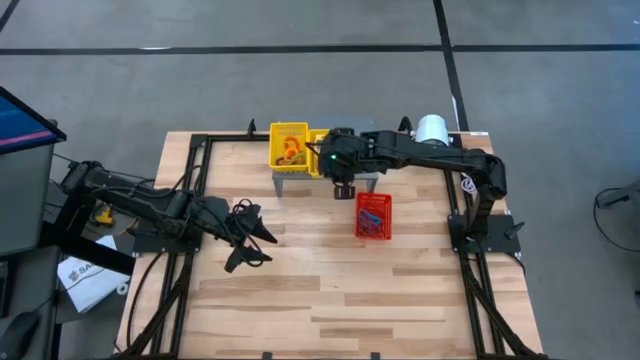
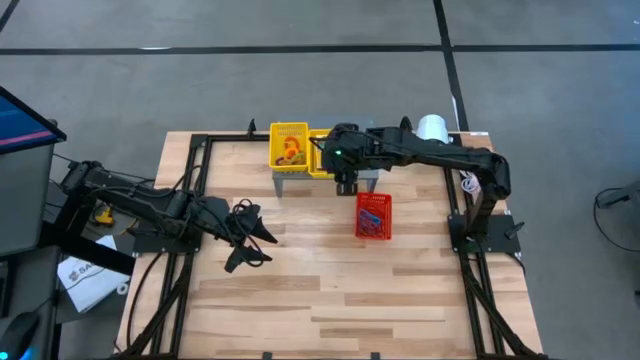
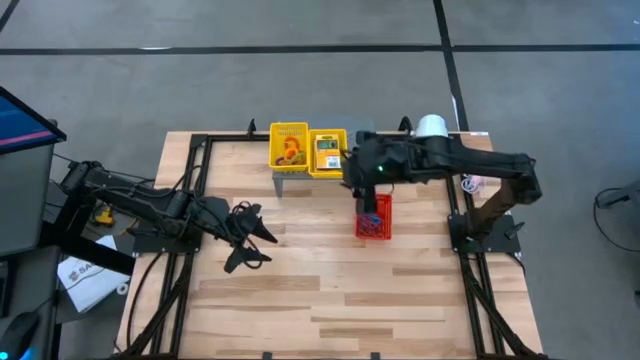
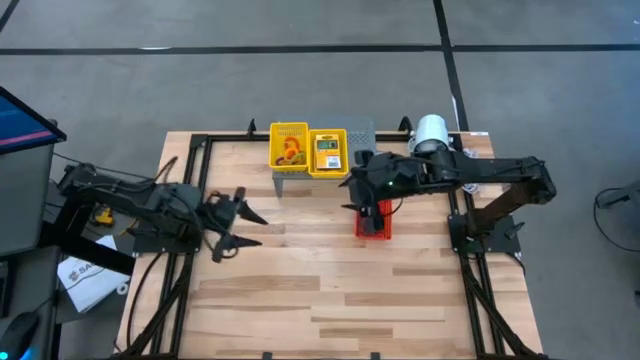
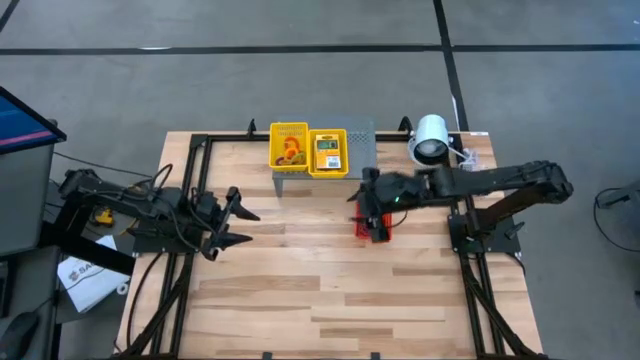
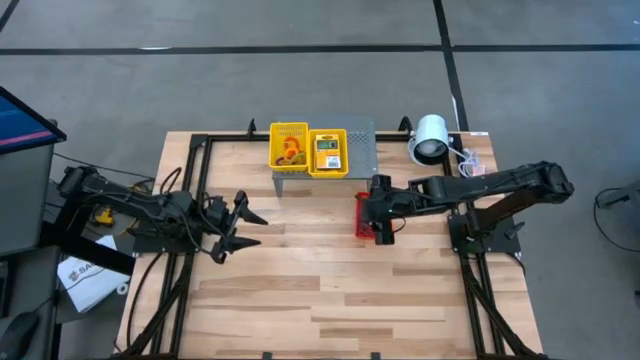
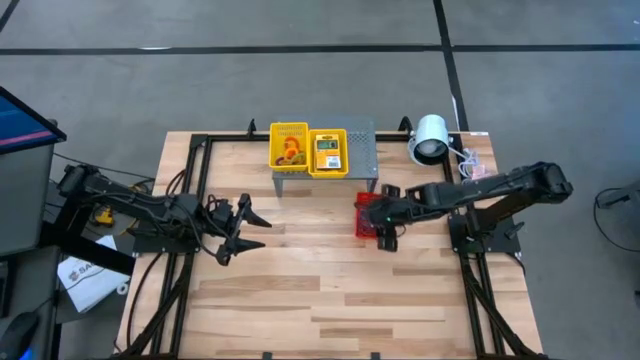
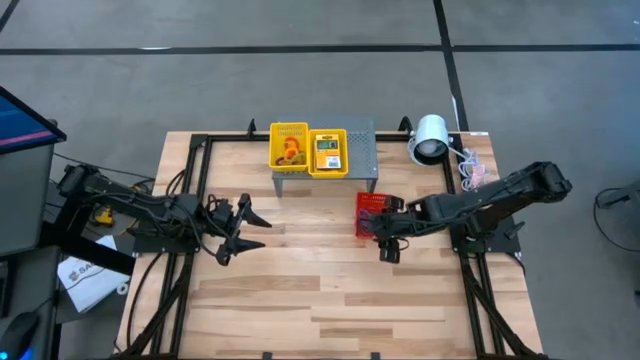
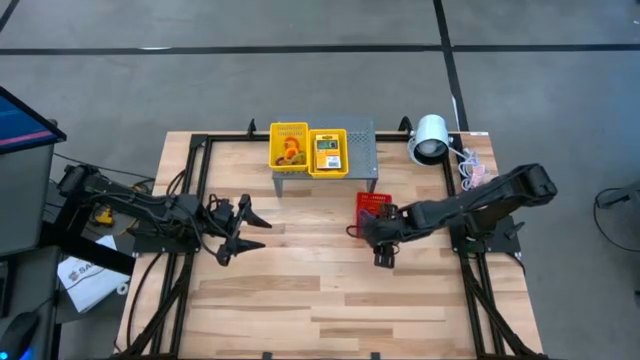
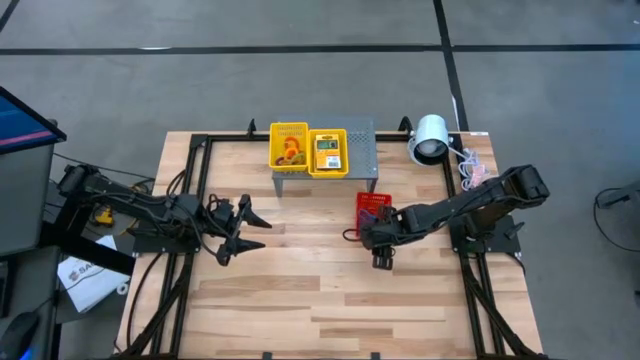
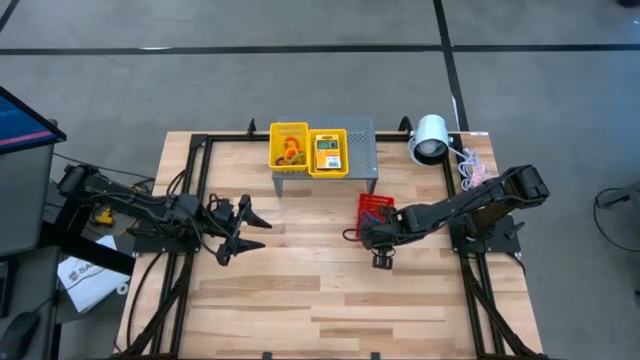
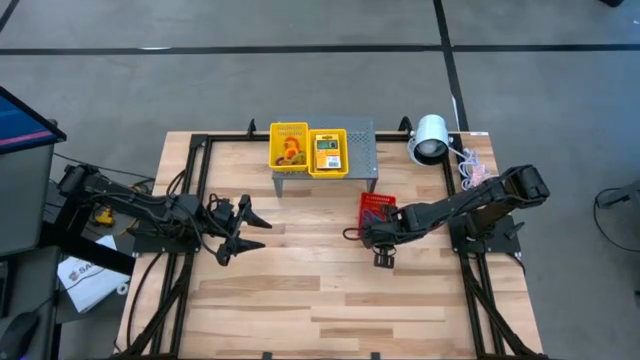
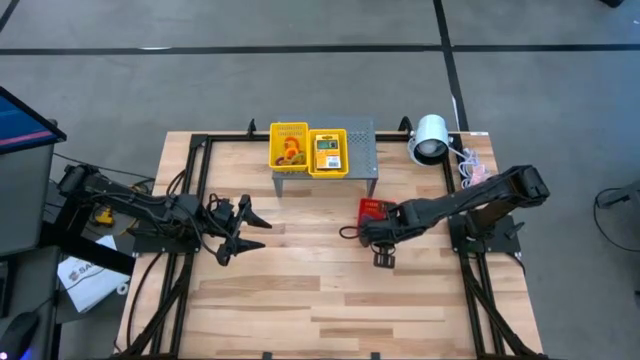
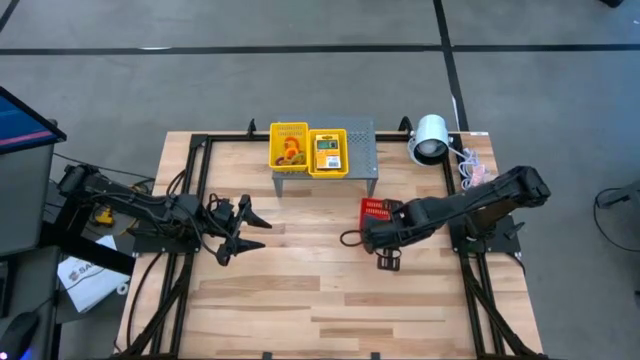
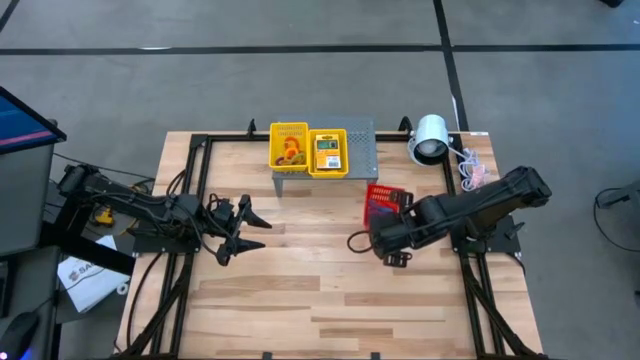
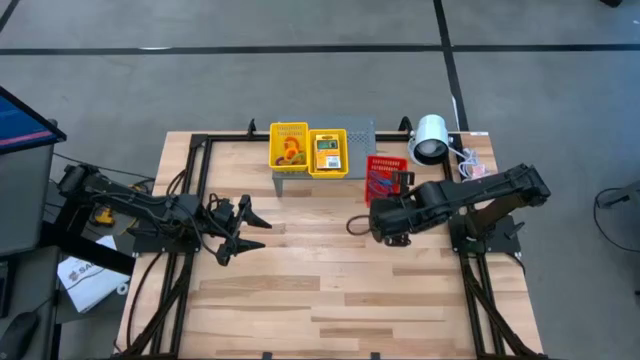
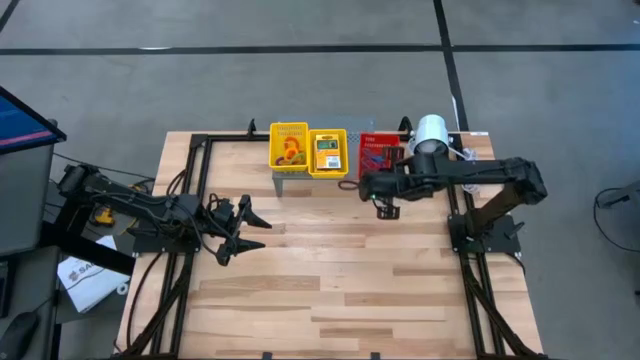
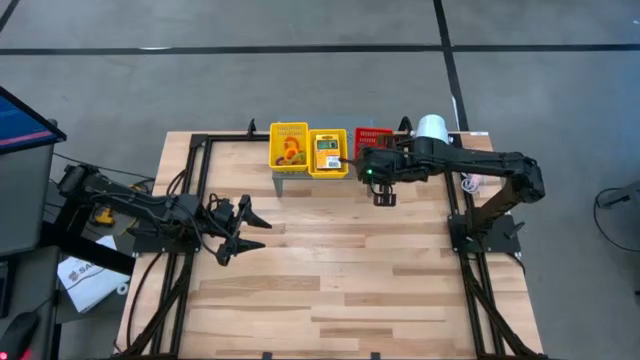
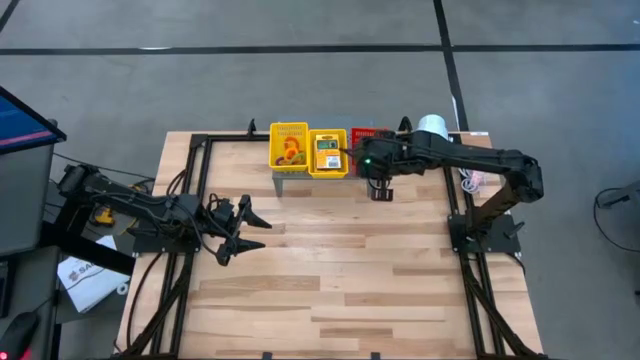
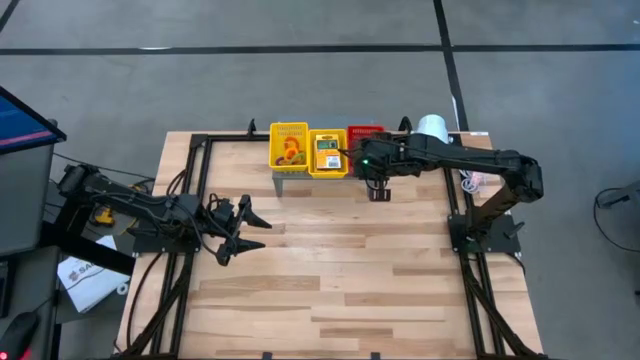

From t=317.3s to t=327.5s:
Task: Pick & Place Office Desk Supplies
Put the red bin on the shelf

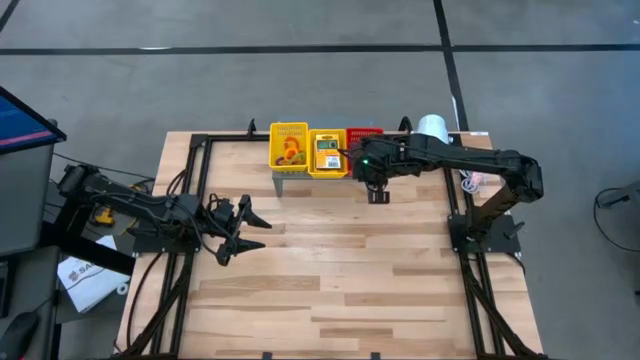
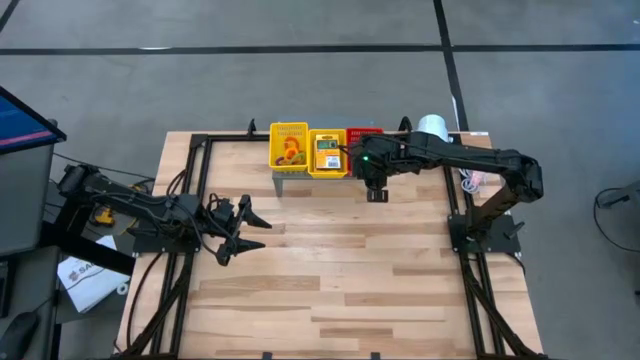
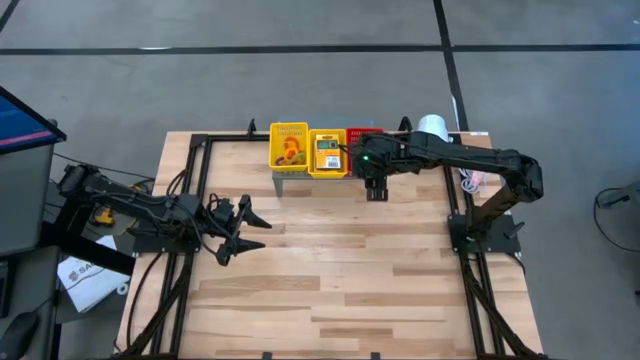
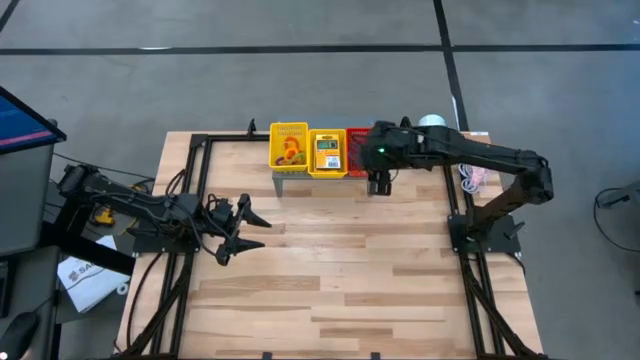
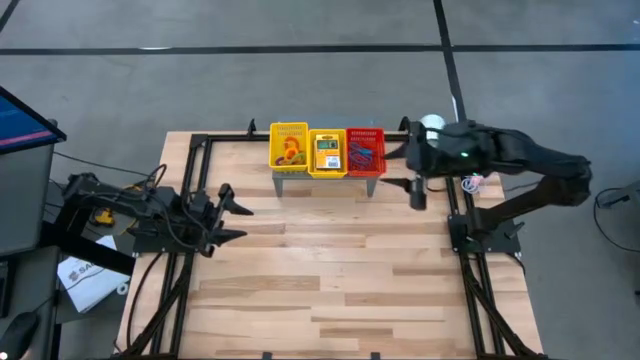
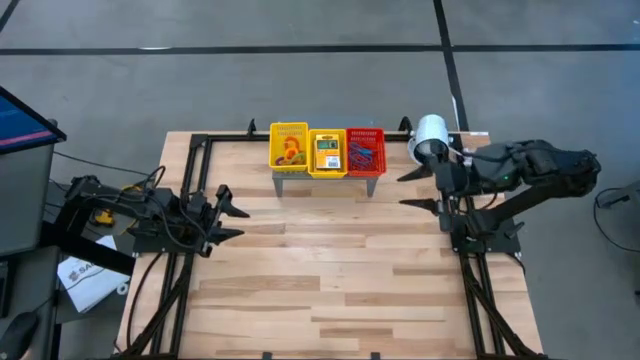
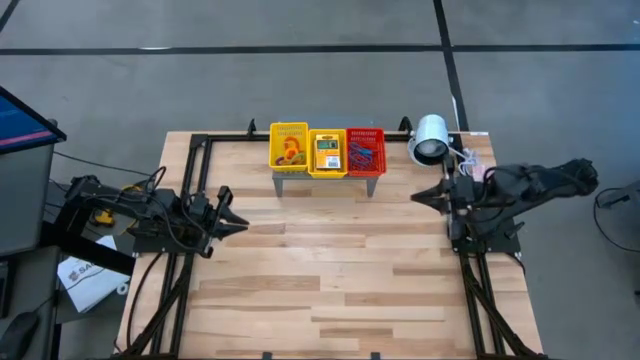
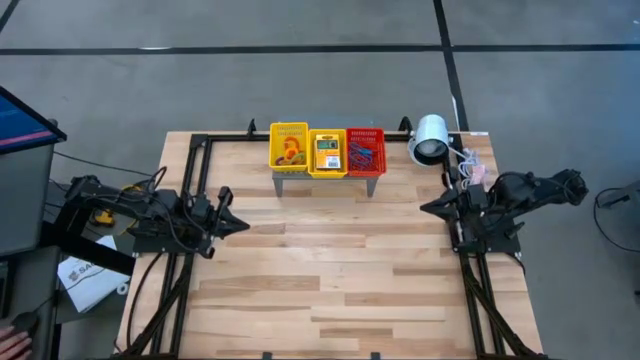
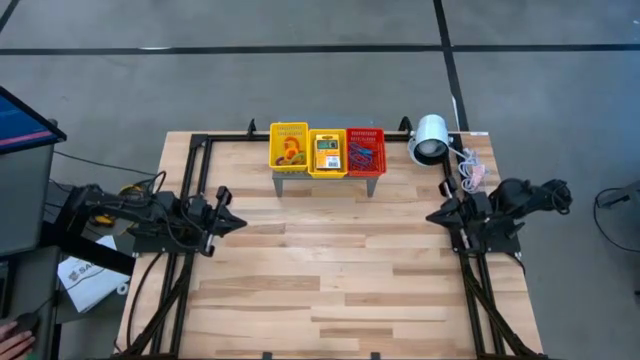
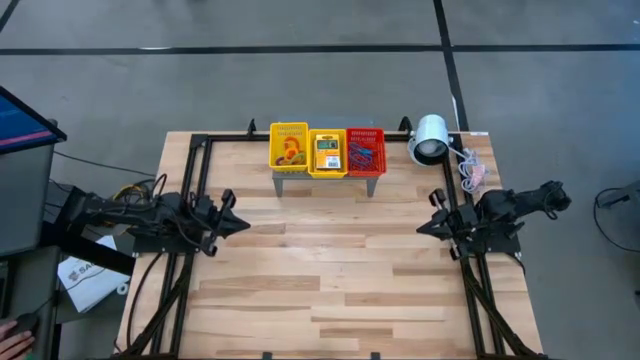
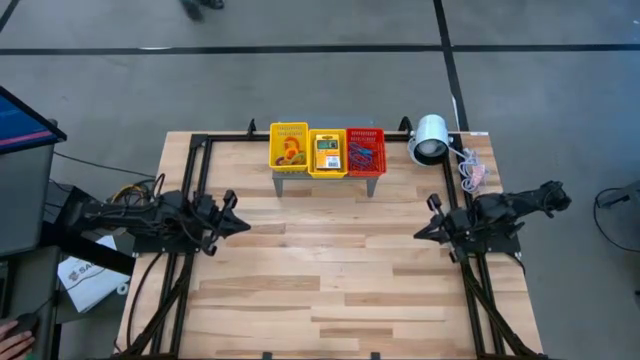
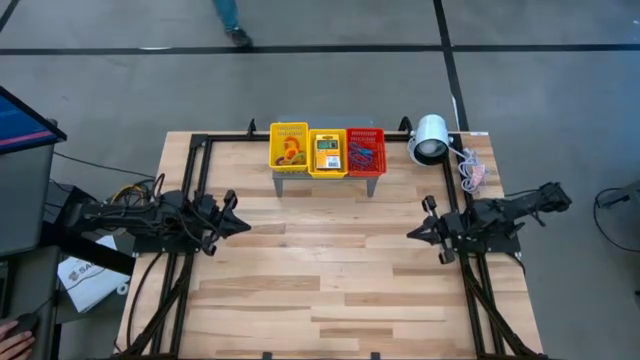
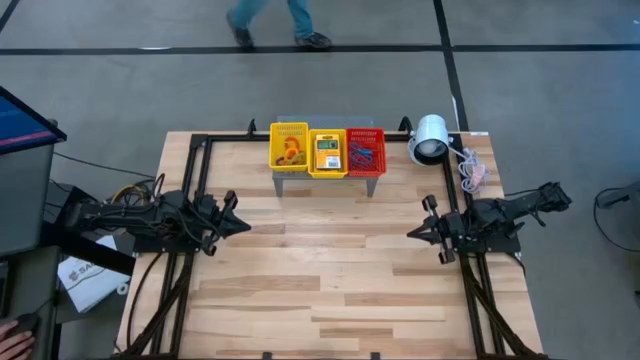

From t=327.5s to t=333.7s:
Return to Home Position

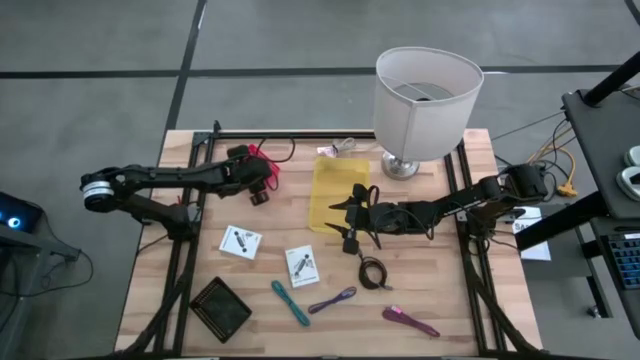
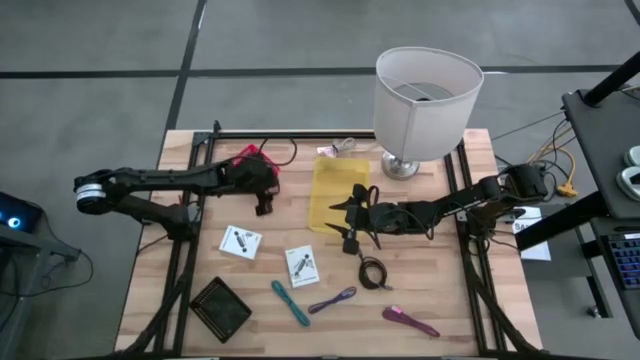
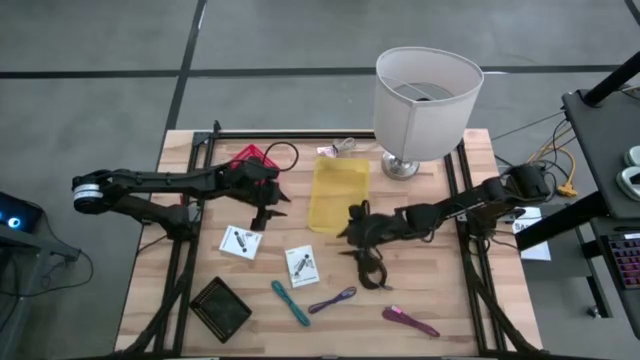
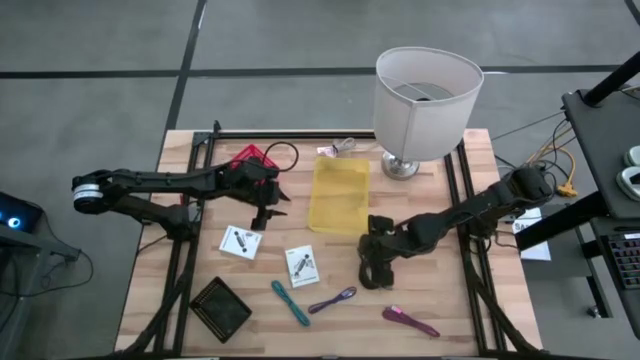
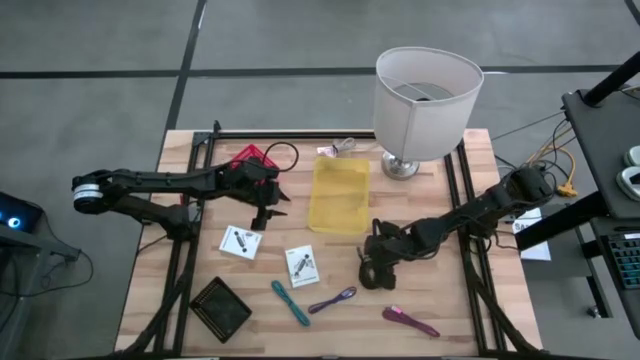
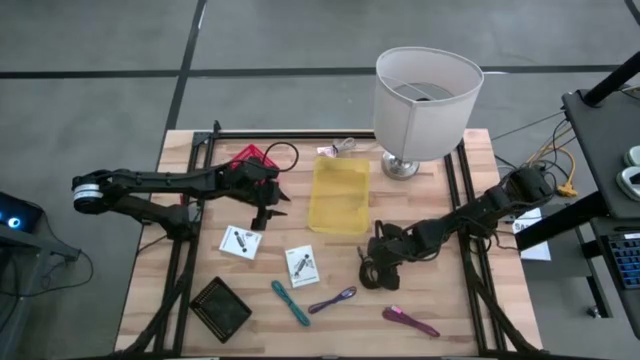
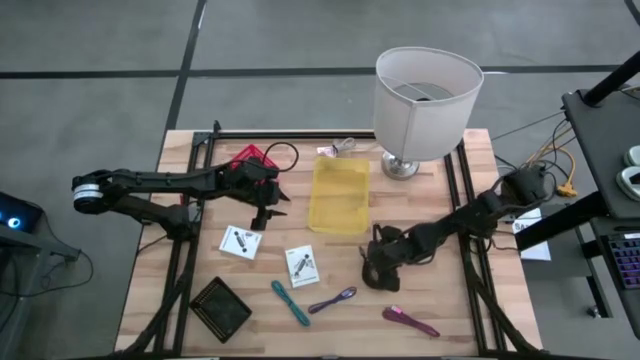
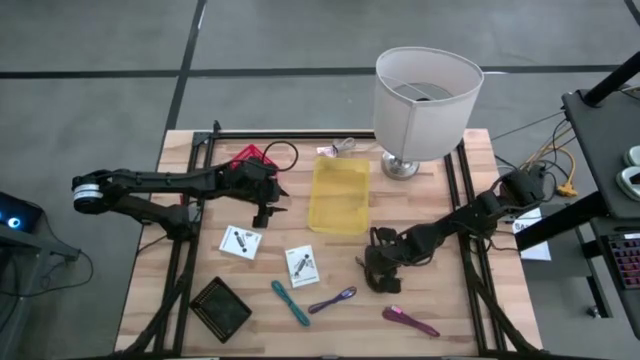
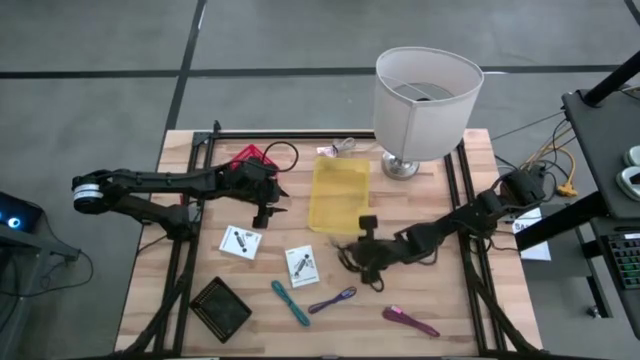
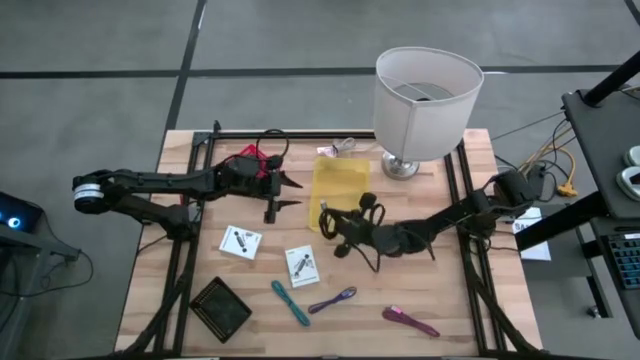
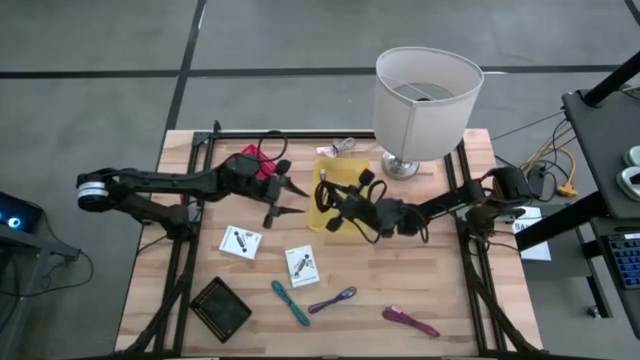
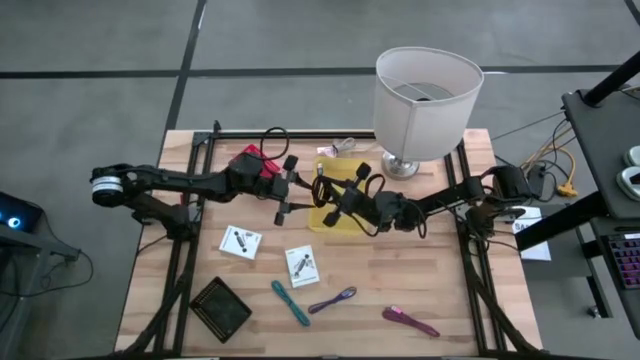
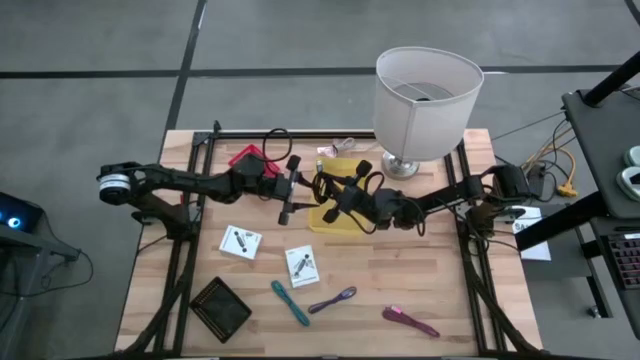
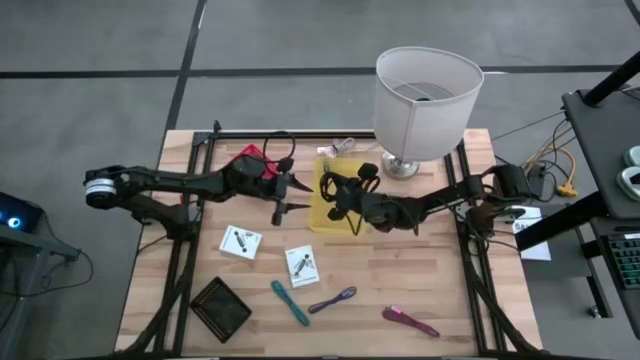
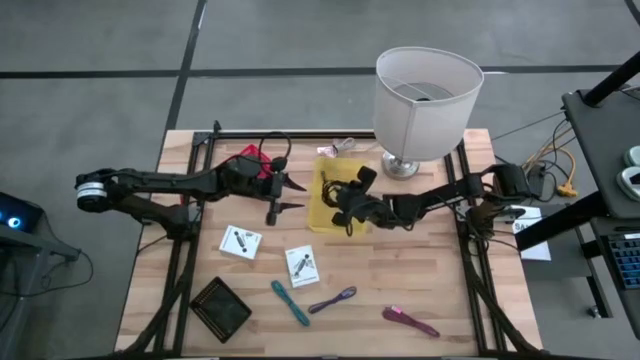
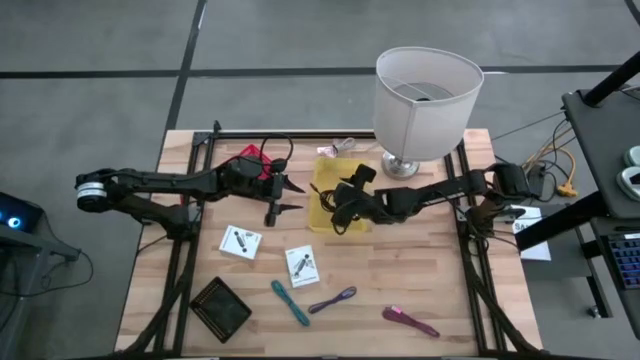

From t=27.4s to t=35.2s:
Task: Pick and place items into bin
Put the black charger cable into the yellow bin
